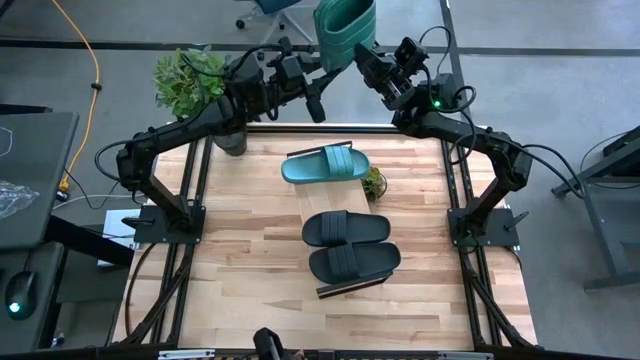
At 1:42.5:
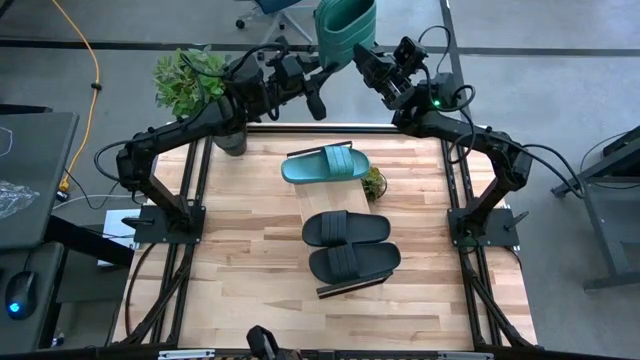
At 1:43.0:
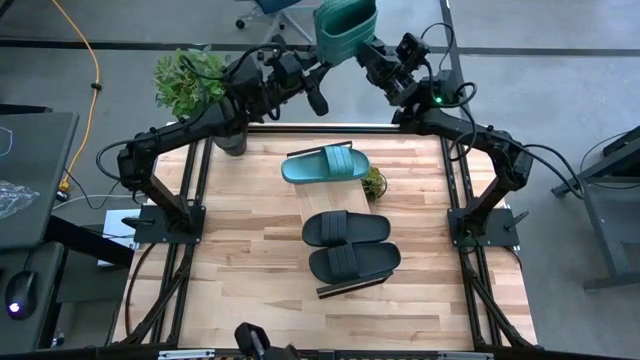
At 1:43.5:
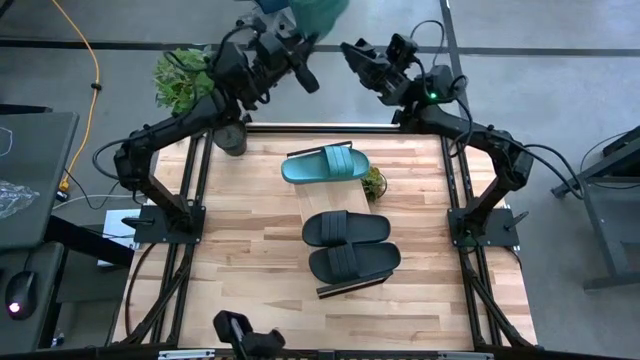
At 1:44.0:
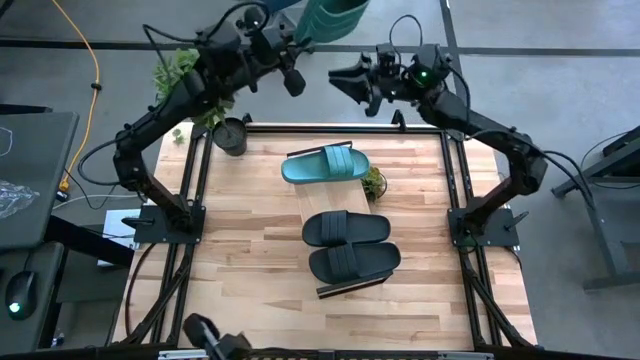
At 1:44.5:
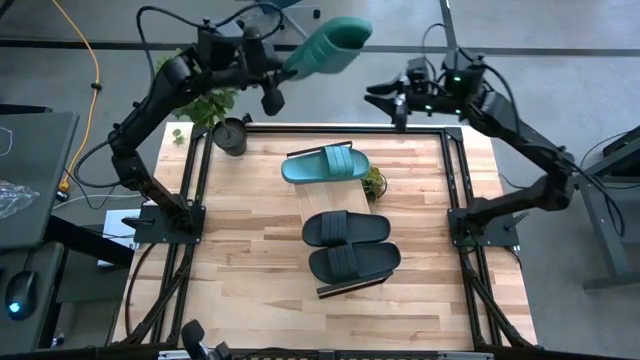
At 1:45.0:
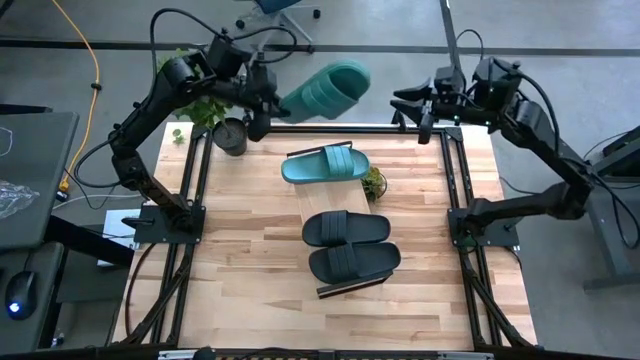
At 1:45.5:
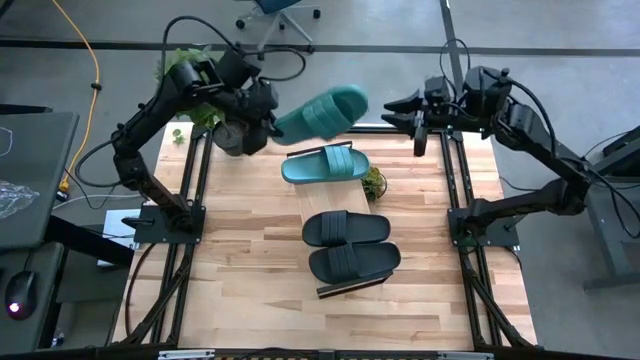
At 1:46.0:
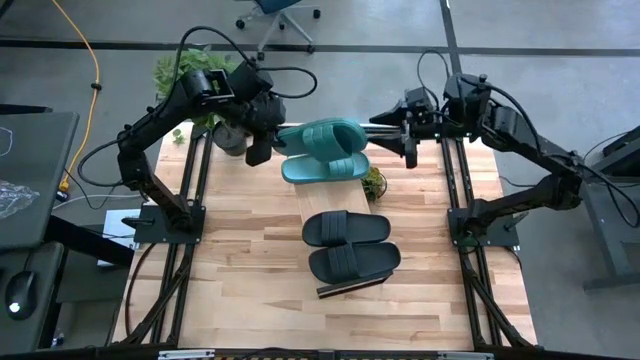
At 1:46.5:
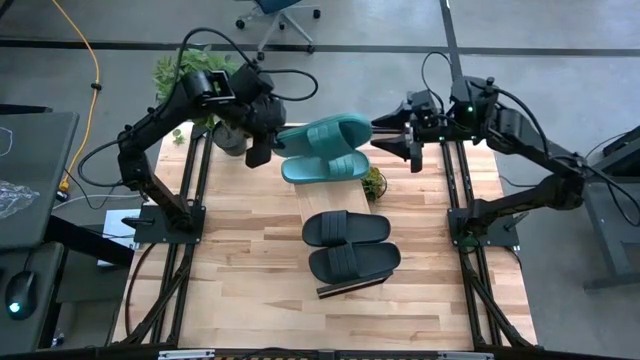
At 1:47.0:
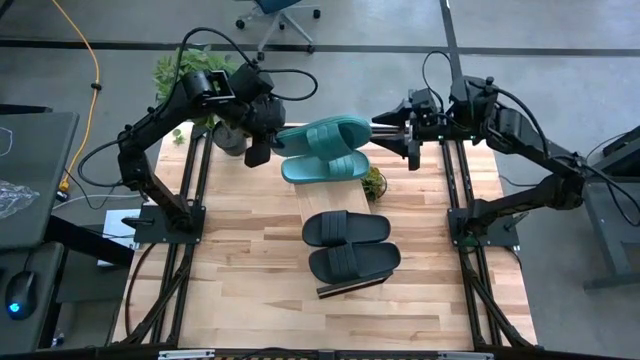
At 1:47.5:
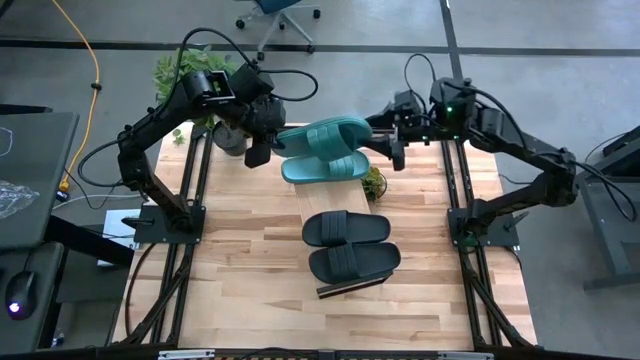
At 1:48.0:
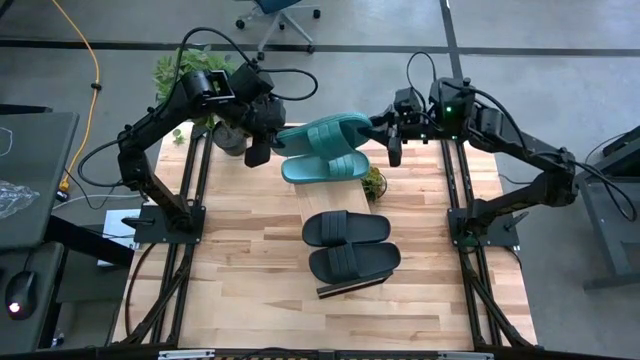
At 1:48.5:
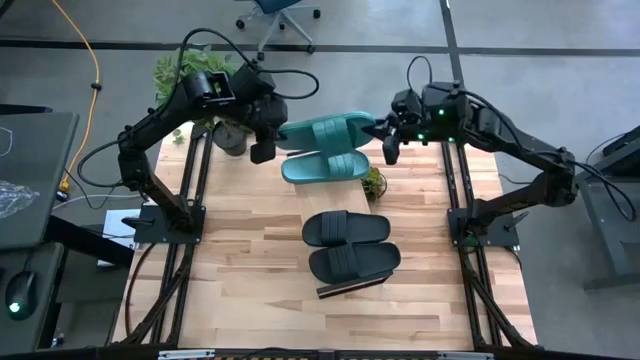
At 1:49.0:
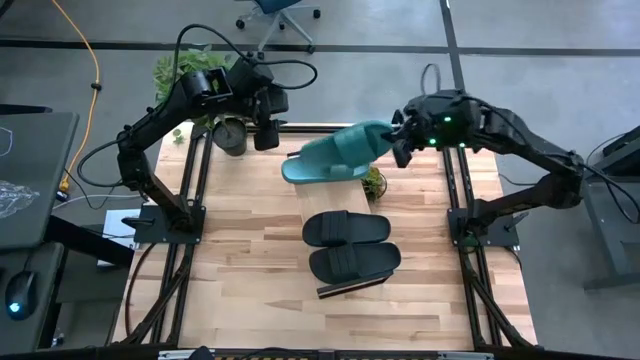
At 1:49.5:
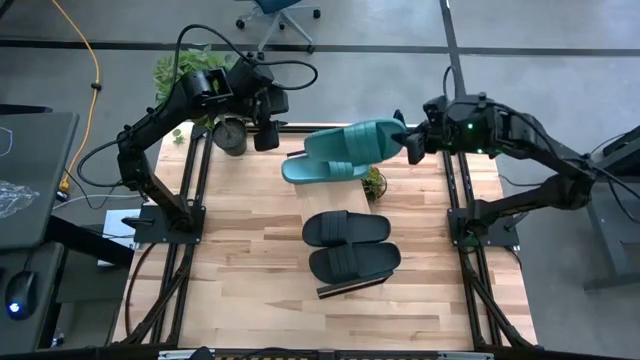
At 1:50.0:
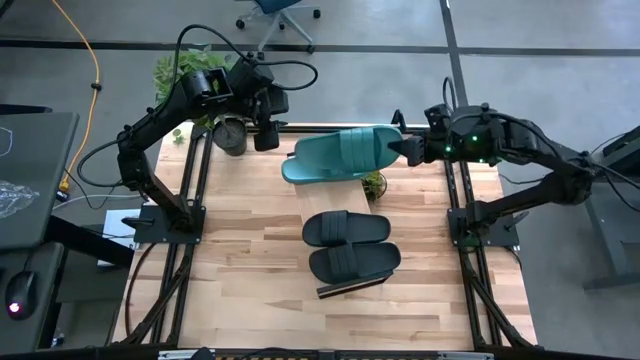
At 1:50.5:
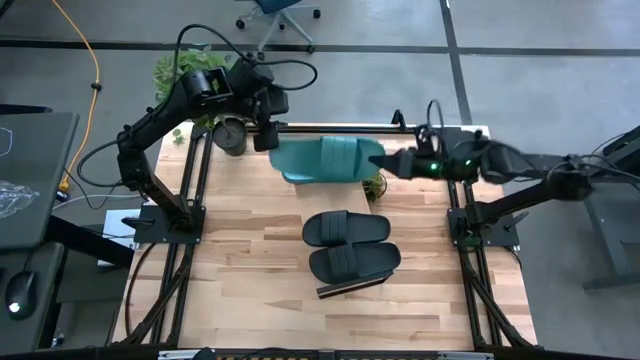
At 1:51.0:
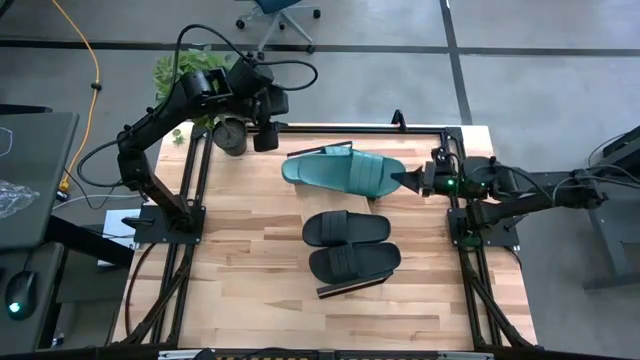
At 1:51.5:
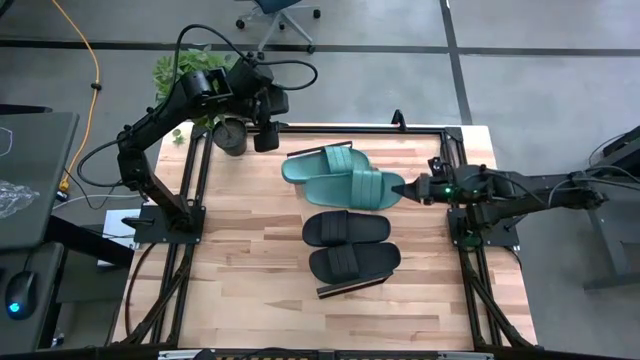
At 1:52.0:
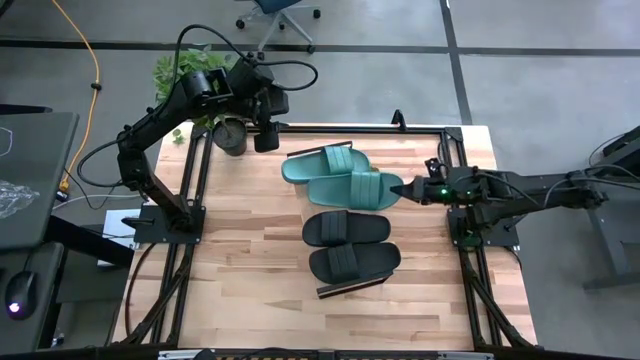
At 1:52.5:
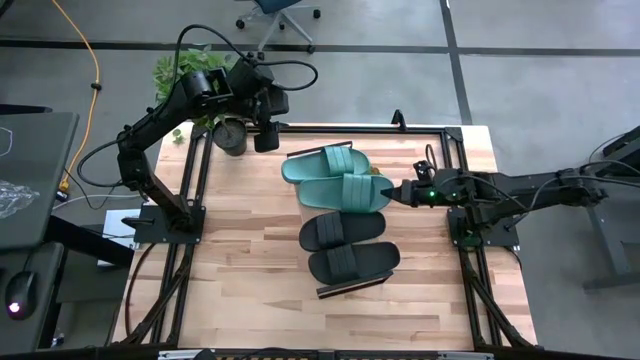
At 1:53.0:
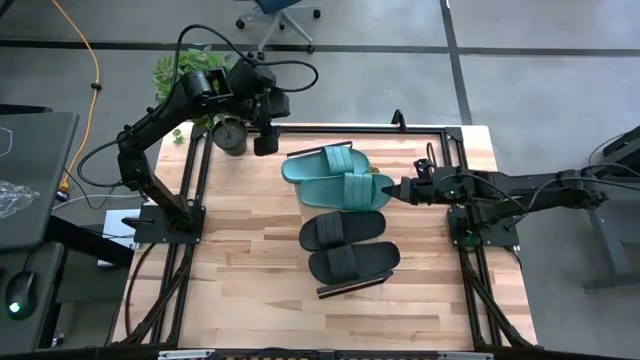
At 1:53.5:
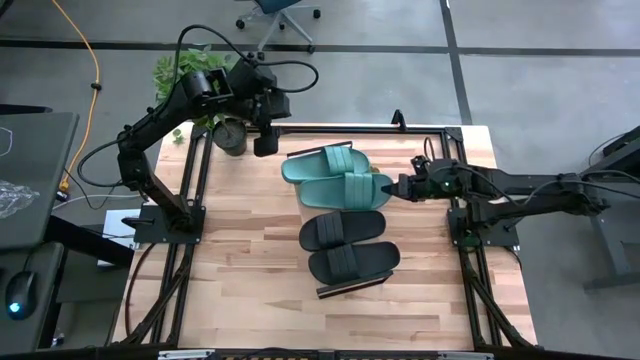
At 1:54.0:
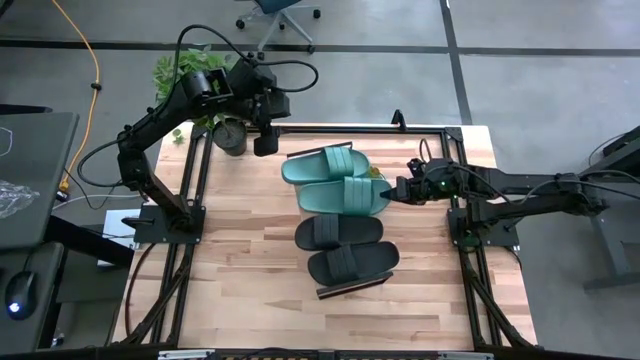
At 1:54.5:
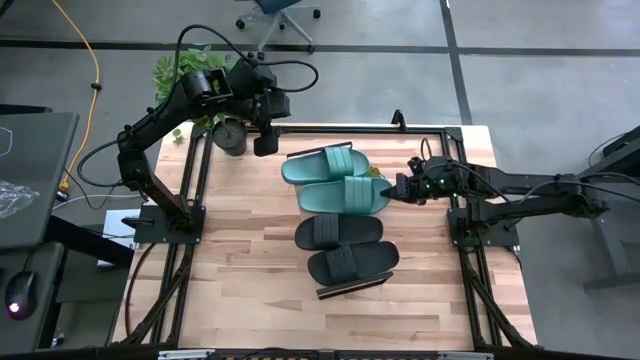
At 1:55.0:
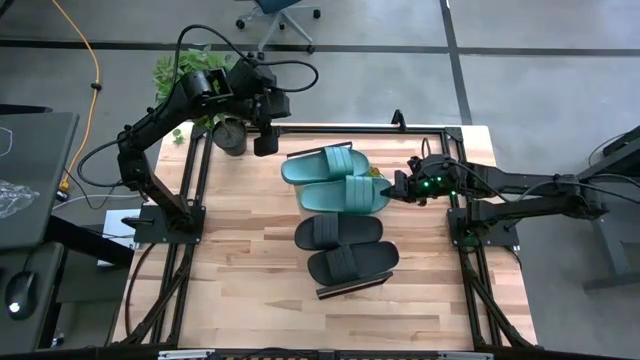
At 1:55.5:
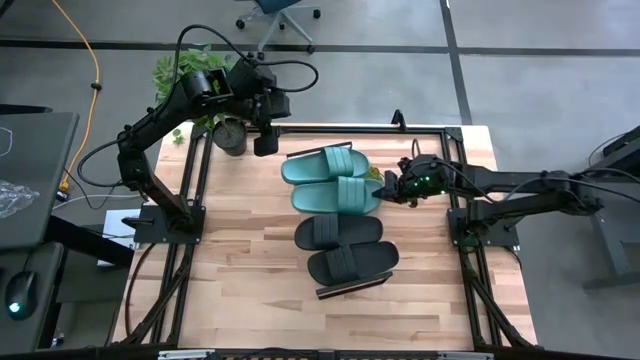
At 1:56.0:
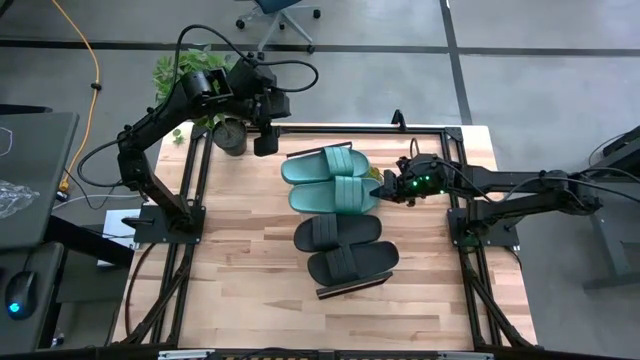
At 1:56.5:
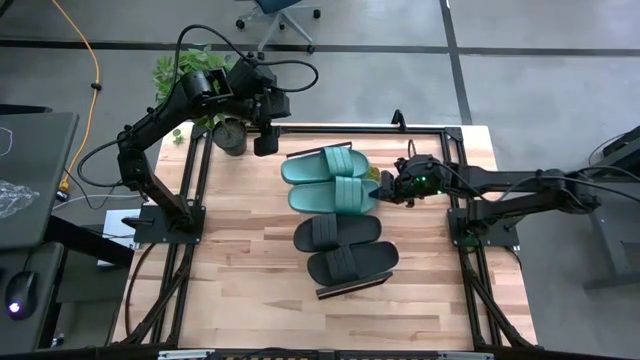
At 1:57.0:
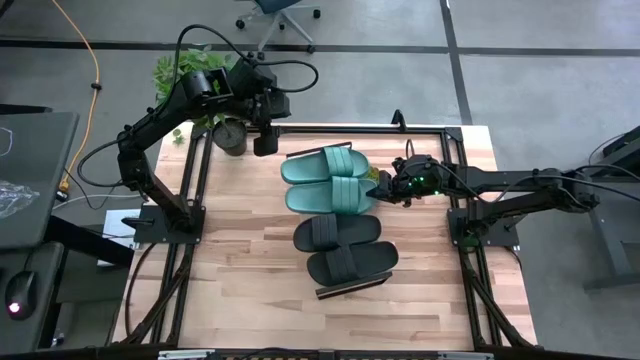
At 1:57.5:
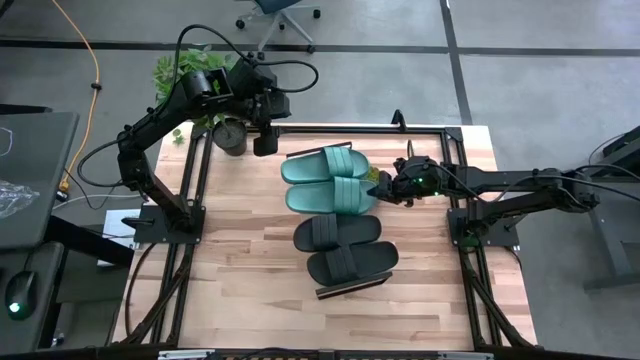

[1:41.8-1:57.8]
Task: Pick and place slides into the shelf
Put the green slipper on the shelf

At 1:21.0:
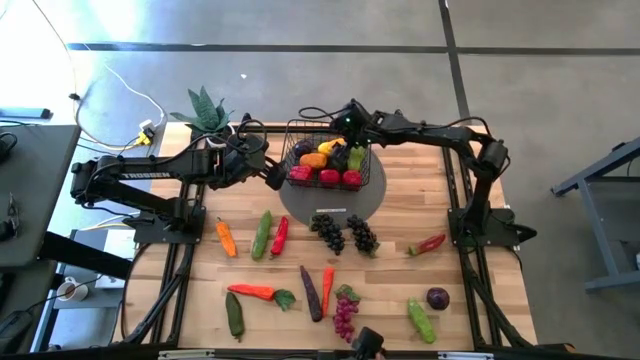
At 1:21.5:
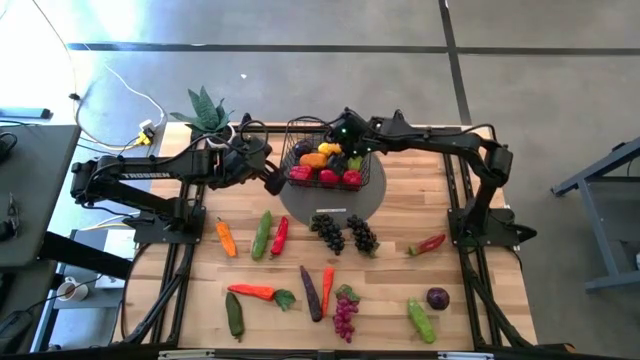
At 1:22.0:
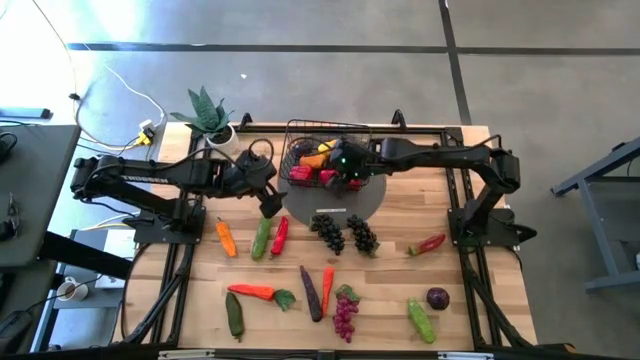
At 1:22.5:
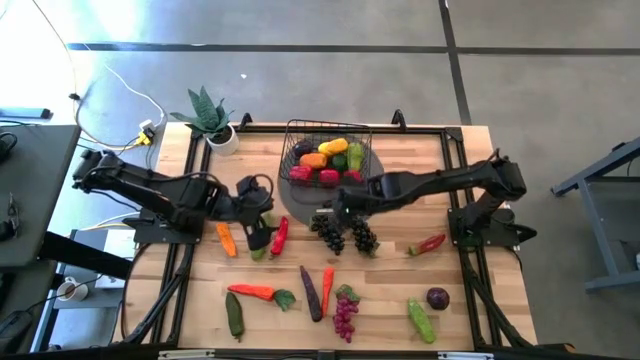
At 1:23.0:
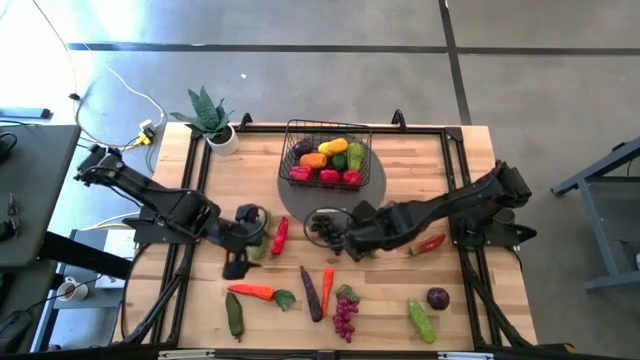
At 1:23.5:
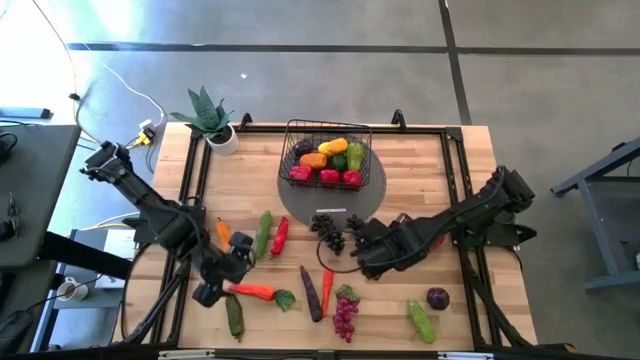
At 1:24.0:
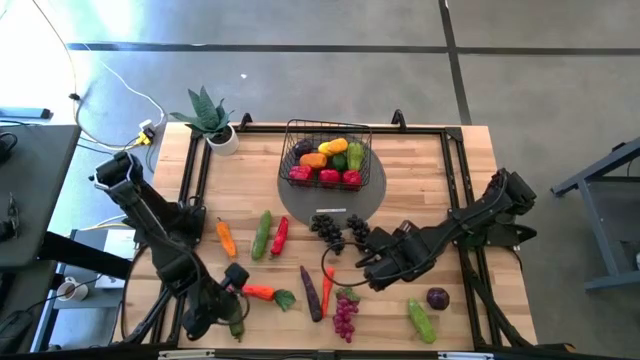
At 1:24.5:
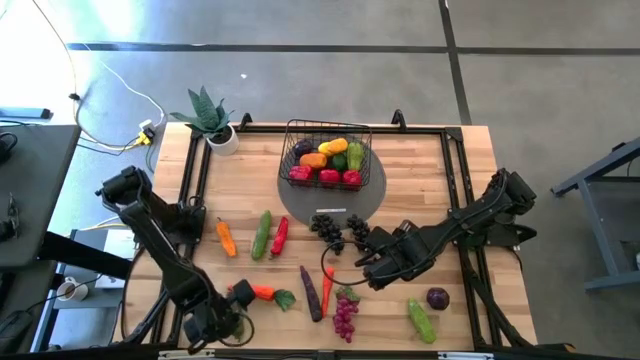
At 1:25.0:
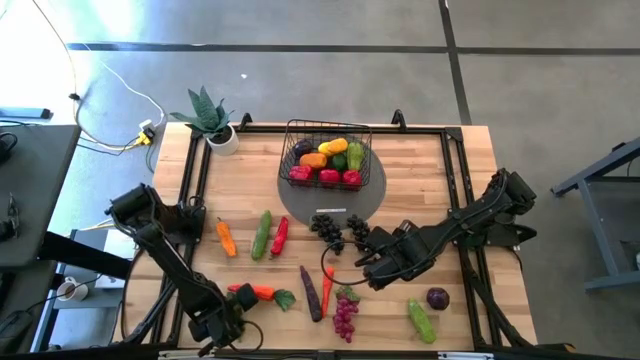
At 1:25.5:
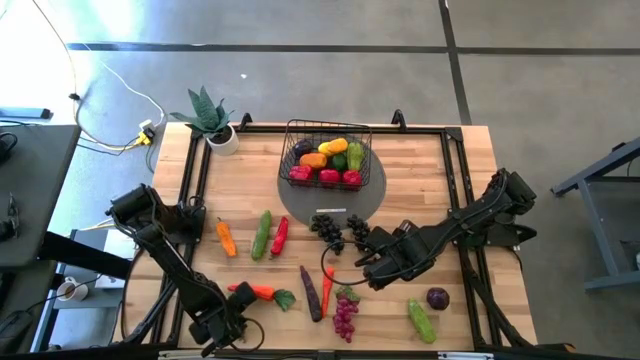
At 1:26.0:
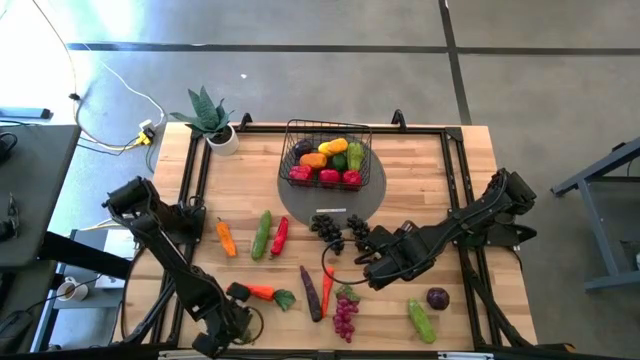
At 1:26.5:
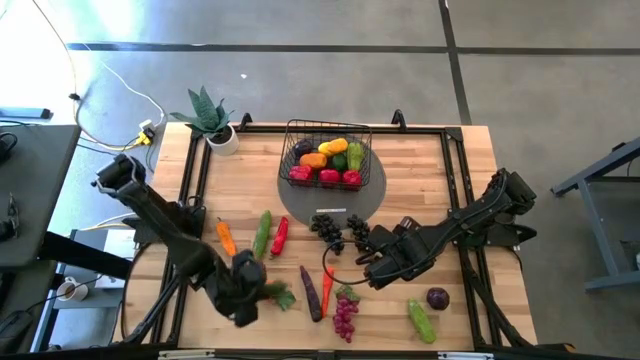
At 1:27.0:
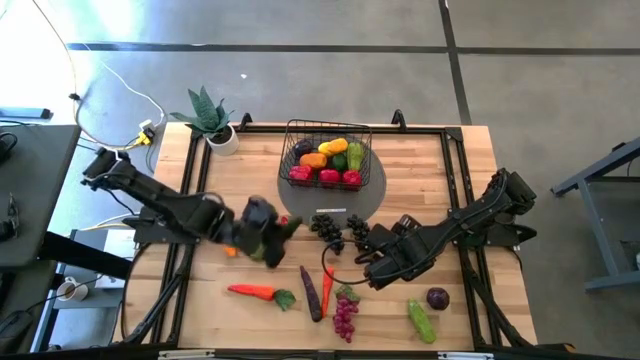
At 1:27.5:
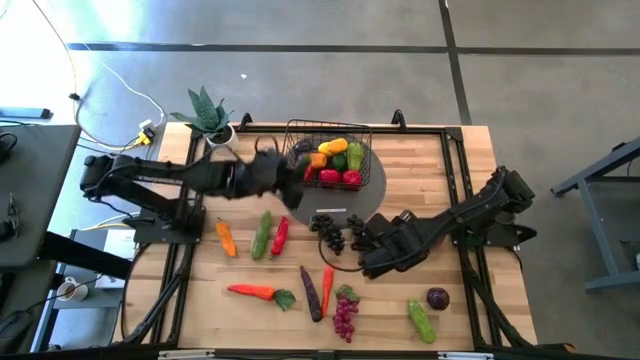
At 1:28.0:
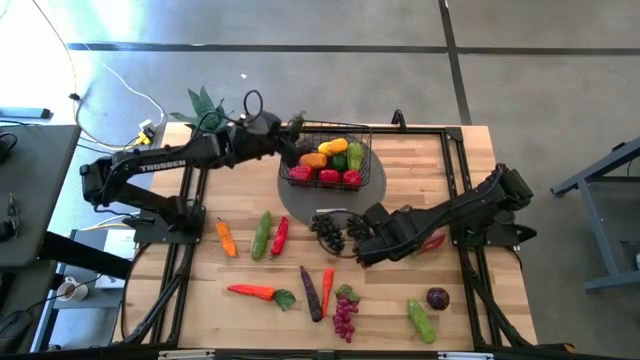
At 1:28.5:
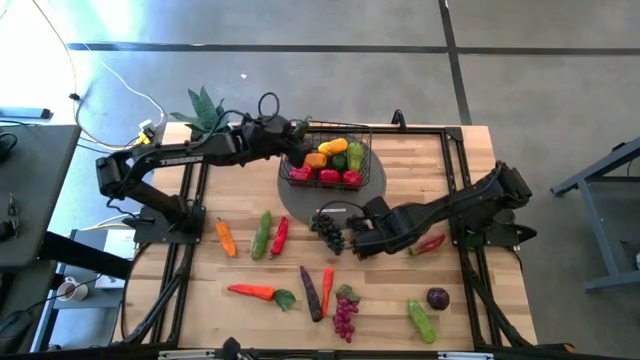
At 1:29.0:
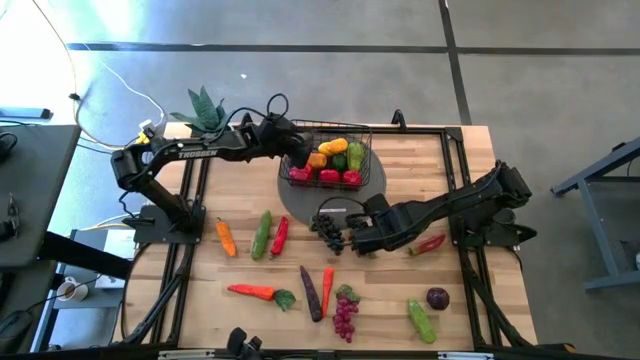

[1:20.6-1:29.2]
Task: Build produce basket
Put the green chilli pepper into the wire basket
